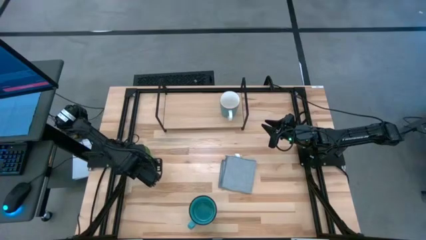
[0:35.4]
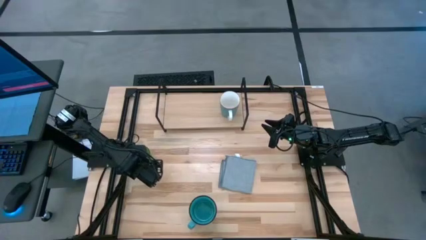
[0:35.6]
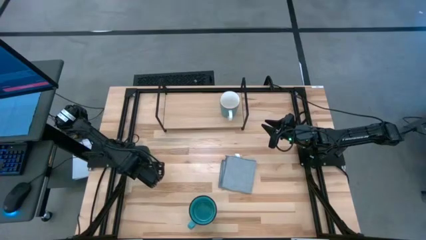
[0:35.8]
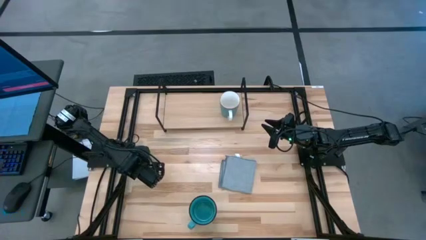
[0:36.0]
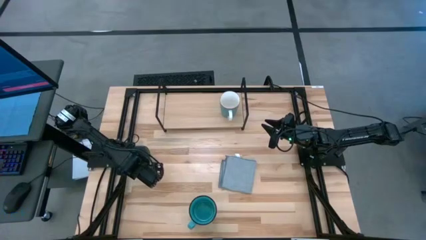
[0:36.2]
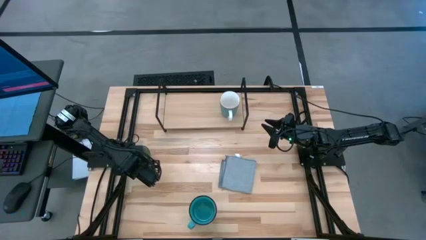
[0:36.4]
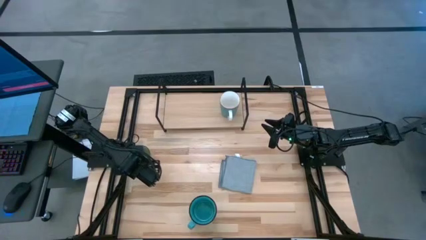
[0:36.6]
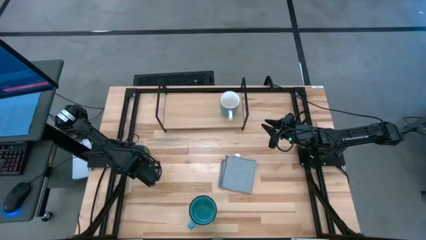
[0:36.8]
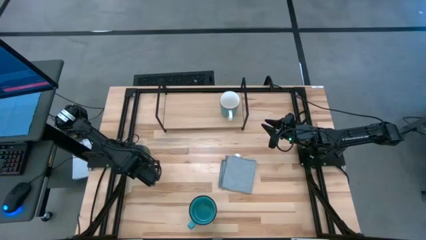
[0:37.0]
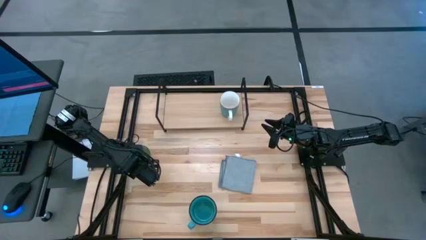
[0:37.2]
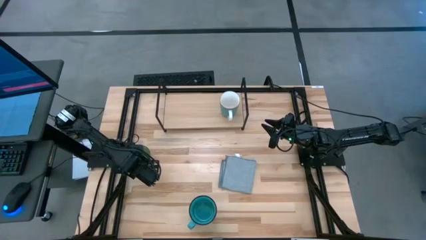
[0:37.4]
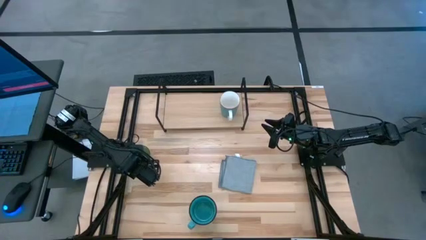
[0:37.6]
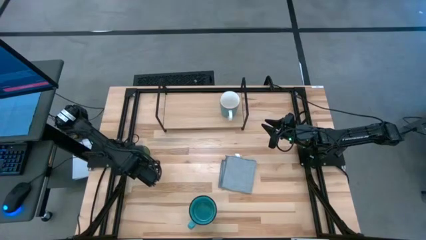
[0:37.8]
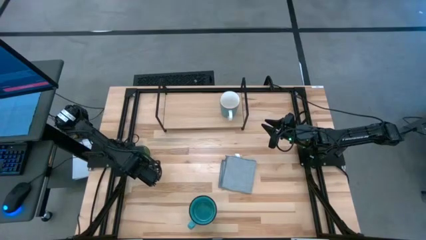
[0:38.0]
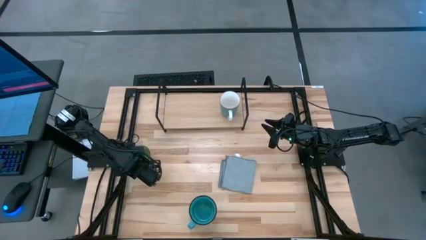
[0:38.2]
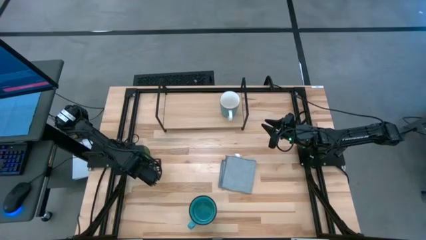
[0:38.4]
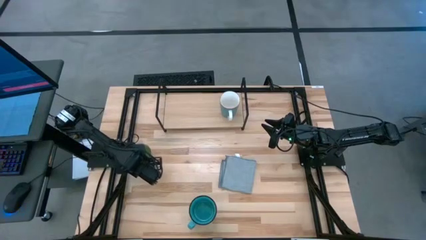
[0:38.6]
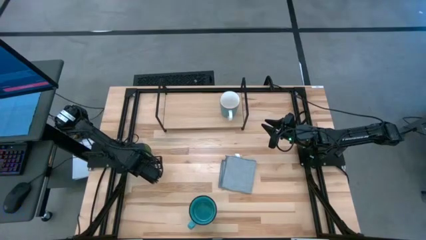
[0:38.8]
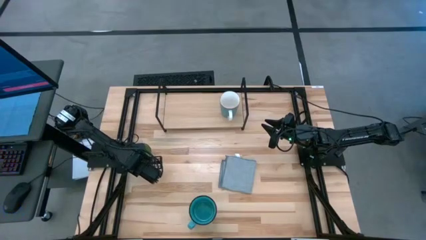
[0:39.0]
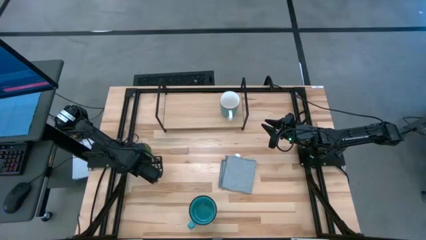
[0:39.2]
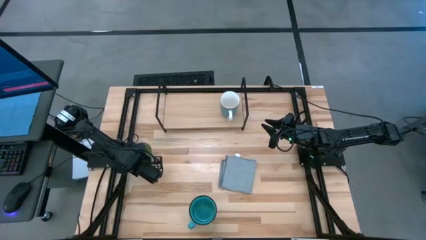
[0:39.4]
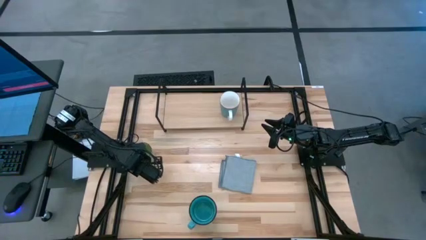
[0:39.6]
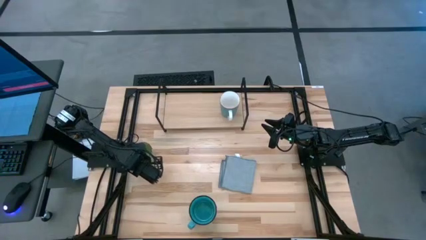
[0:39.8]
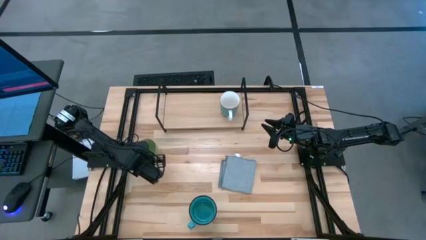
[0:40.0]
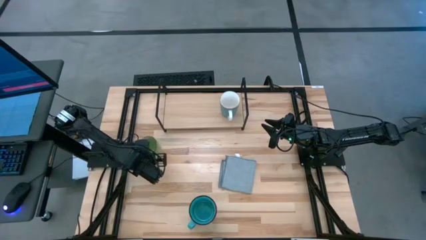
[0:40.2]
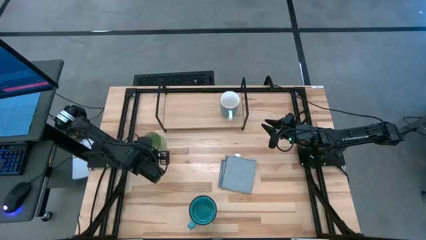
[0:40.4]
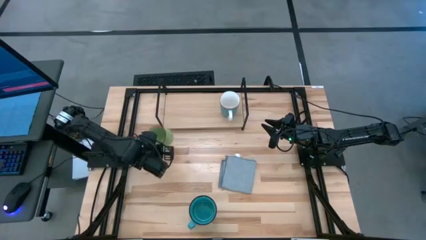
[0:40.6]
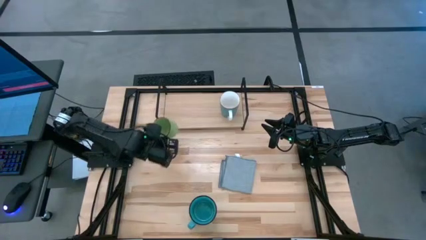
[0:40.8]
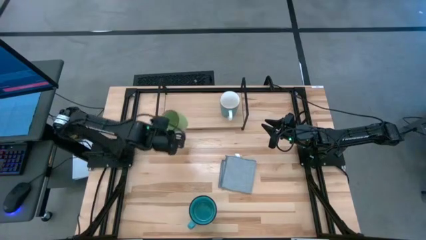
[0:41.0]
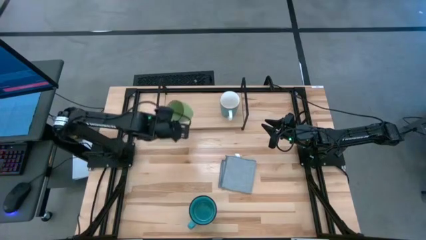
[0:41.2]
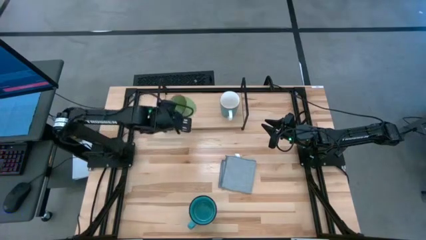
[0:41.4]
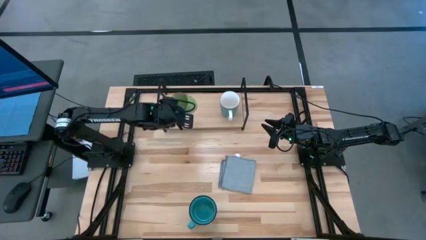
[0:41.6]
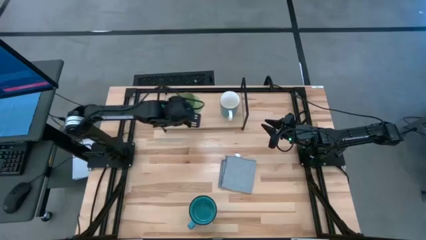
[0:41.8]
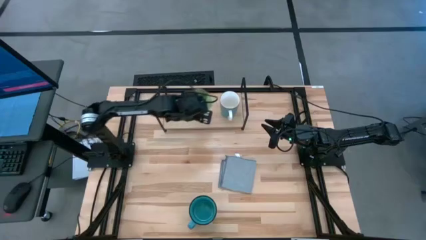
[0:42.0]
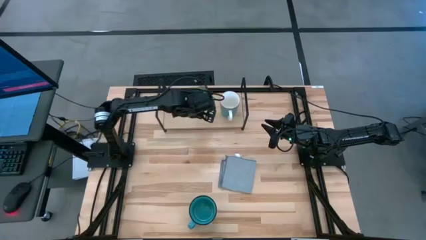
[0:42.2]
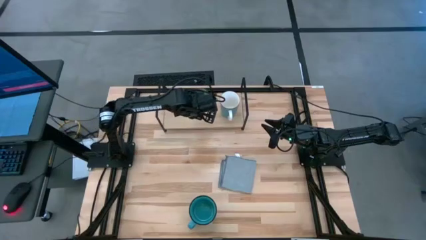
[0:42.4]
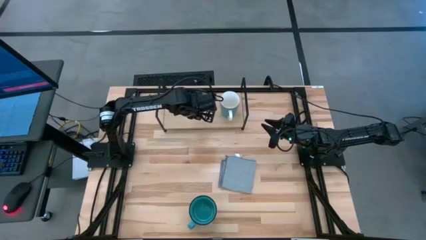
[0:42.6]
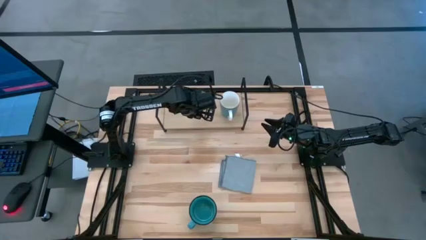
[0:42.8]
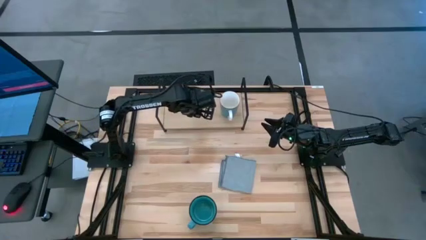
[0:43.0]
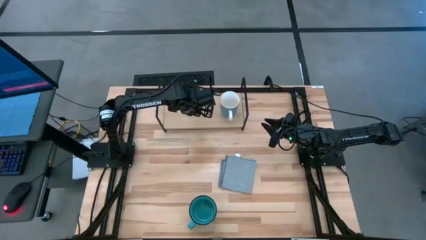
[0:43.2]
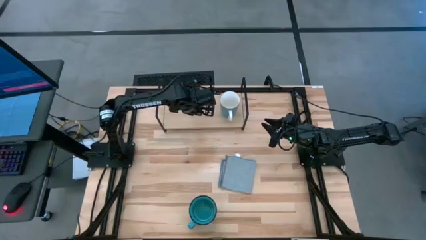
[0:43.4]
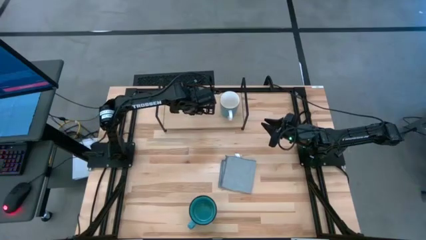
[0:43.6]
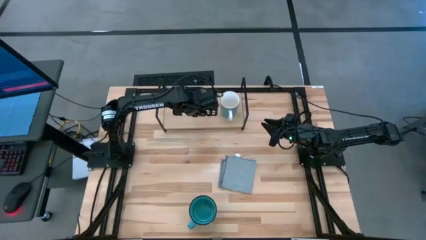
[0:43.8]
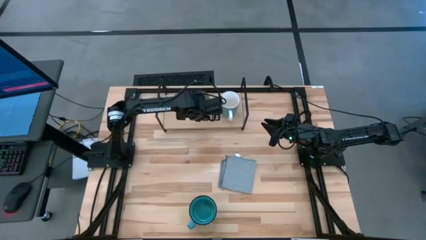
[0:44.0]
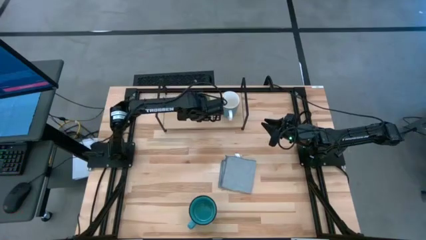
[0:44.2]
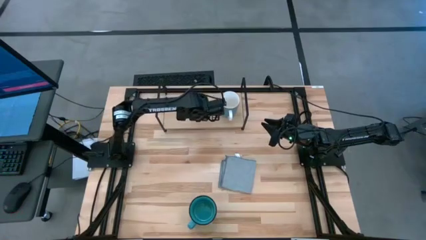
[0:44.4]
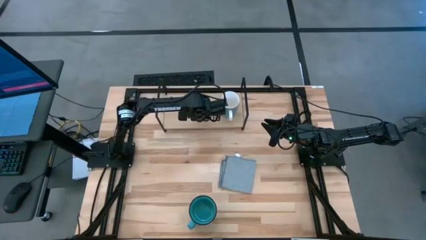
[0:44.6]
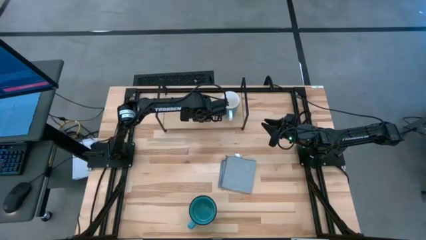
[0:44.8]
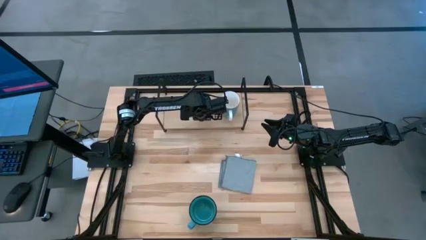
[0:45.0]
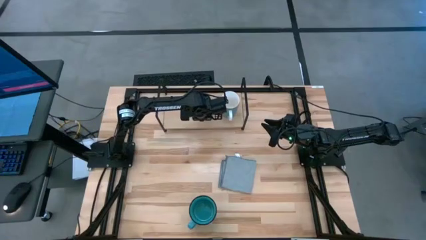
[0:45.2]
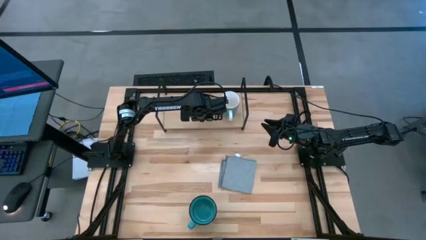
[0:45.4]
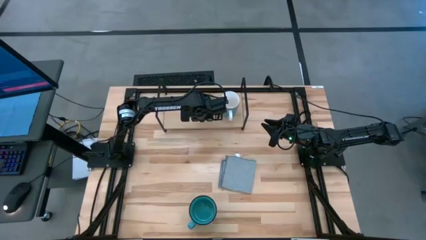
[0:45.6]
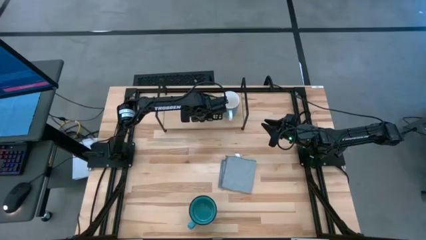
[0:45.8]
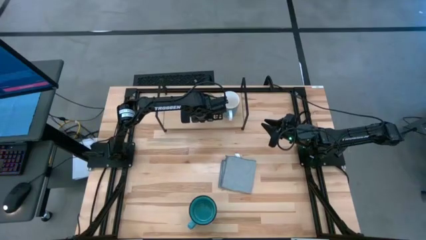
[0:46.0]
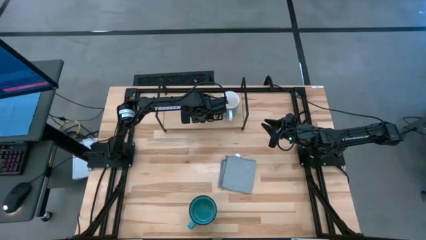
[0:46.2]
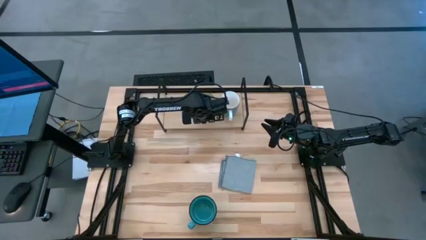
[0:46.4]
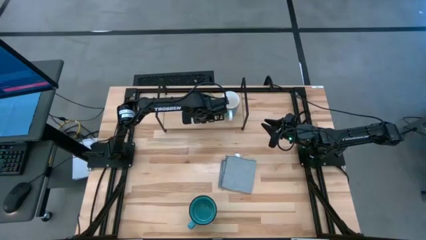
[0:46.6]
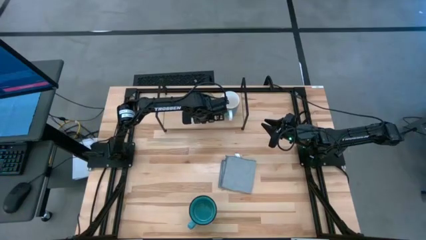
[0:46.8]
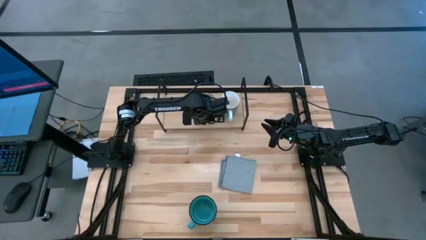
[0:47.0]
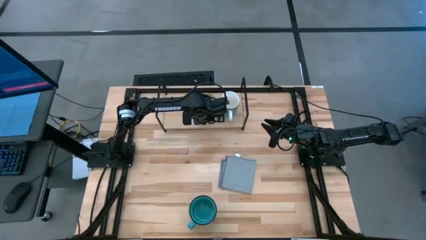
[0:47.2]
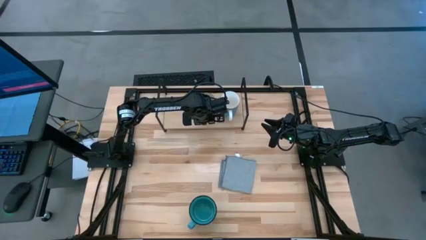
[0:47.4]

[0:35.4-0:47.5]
Task: Stack small to large cups/mugs on shelf
Put the green mug on the shelf

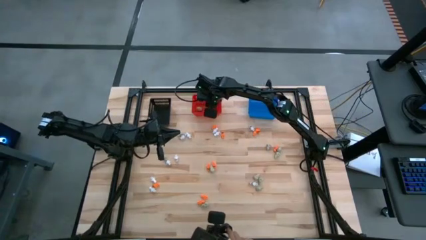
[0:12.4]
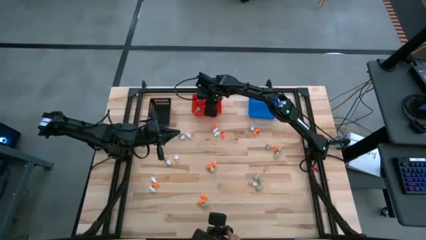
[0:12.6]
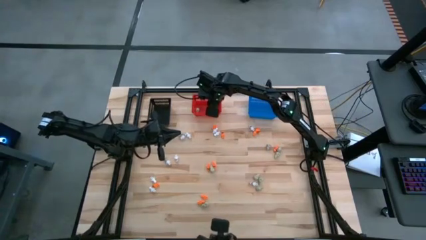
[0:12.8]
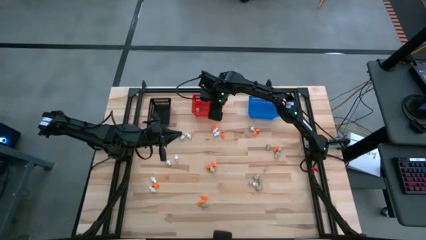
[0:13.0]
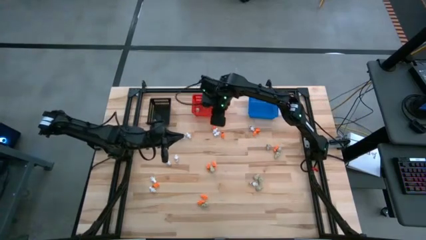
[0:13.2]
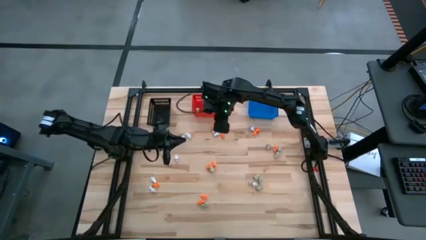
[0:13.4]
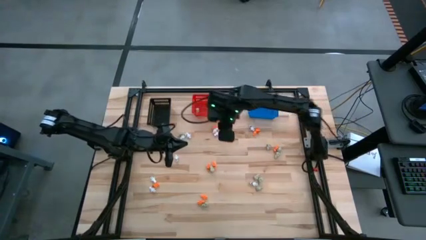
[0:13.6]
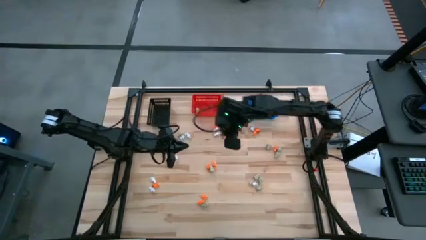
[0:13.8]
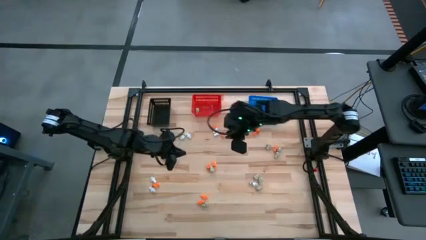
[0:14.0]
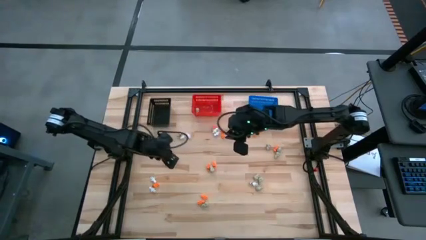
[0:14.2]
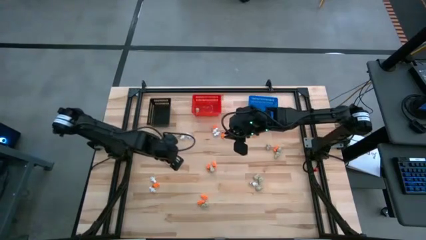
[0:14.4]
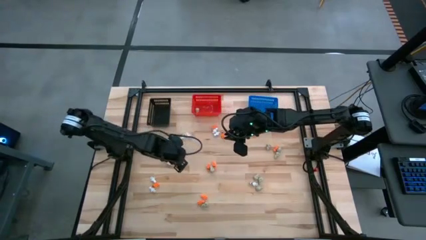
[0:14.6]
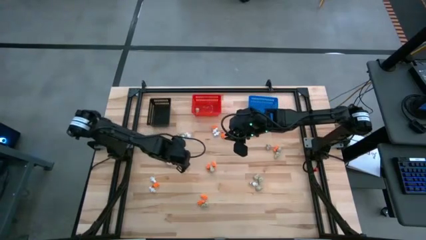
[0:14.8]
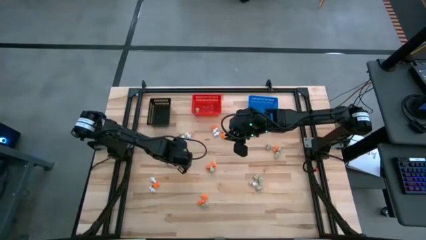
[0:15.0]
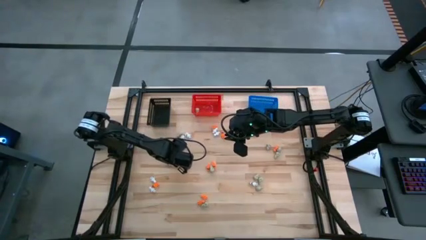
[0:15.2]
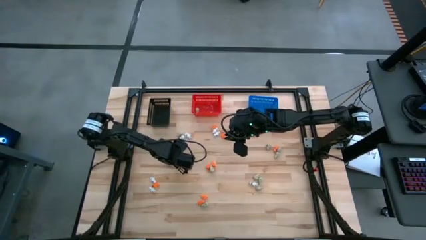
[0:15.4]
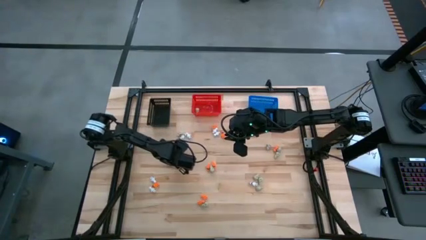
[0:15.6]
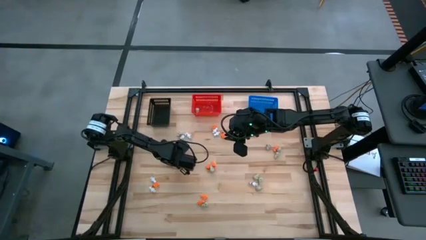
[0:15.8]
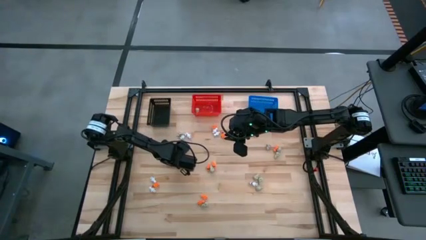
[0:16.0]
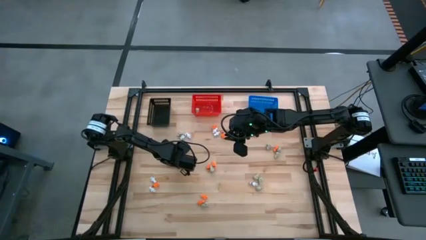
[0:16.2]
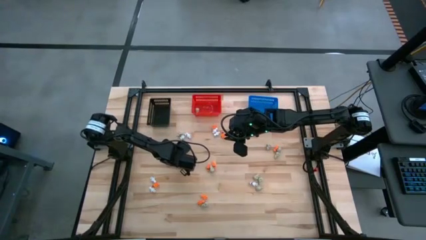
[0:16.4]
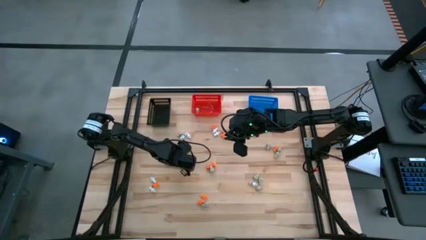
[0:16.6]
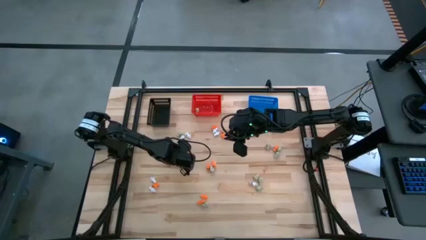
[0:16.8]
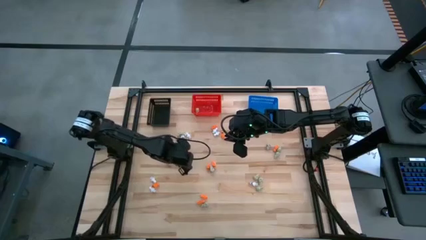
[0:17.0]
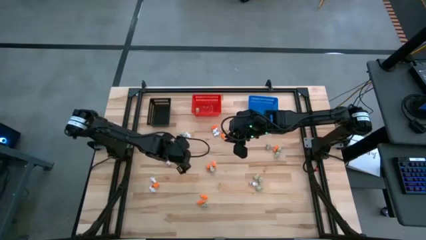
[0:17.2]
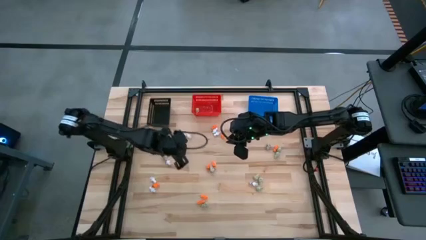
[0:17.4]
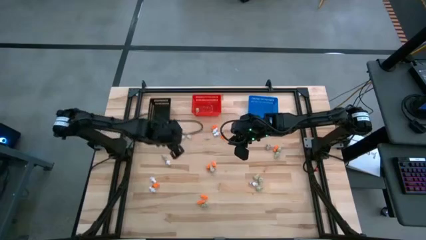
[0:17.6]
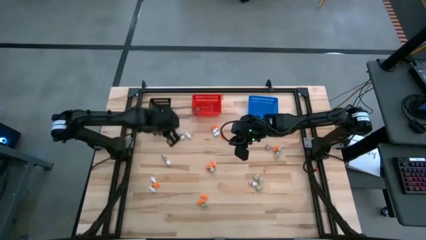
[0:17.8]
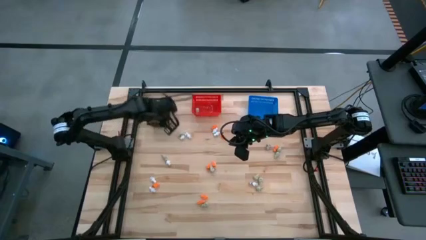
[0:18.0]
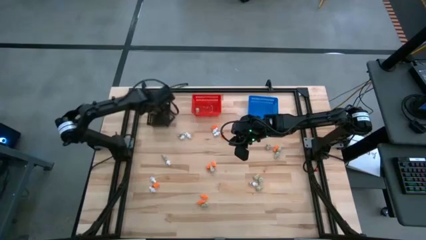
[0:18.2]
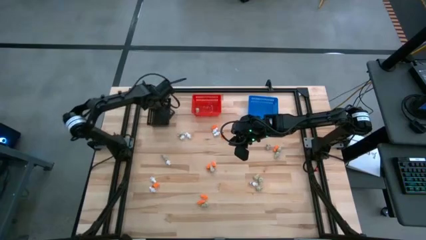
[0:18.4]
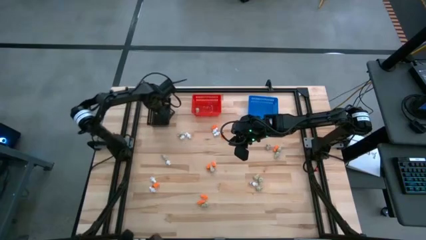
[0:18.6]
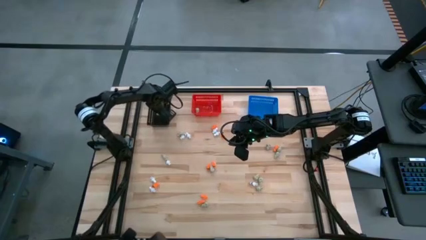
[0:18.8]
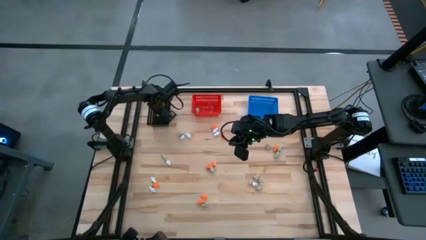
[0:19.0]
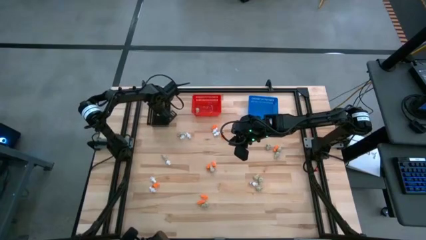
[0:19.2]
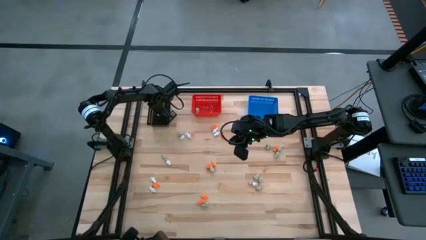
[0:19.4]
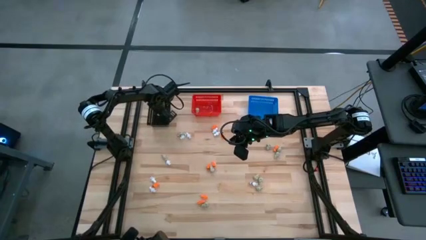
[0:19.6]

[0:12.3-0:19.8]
Task: Sort Halloween decoration
Put the white skeleton toy into the black bin
